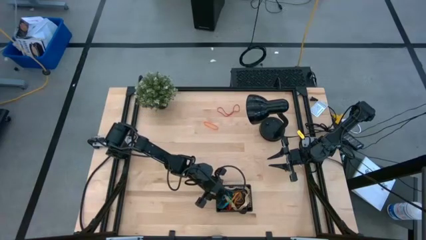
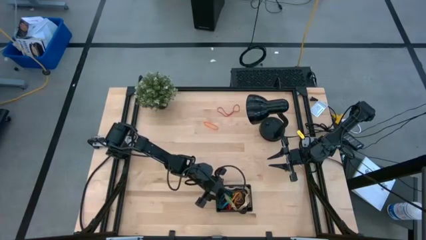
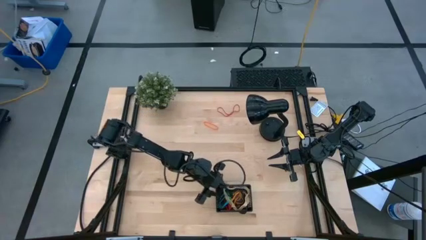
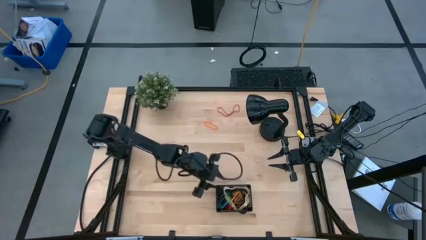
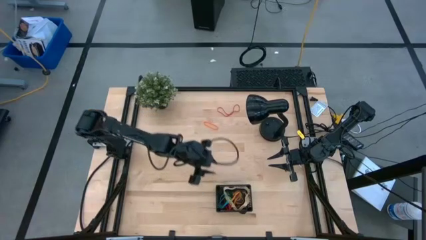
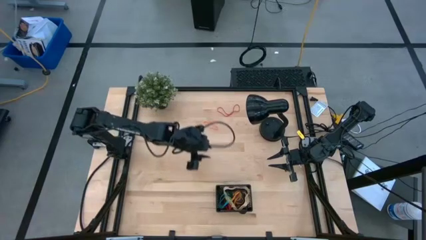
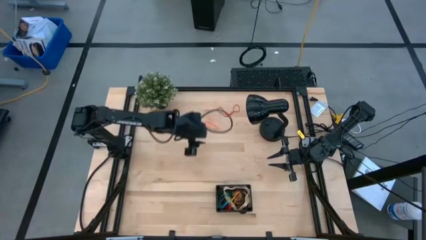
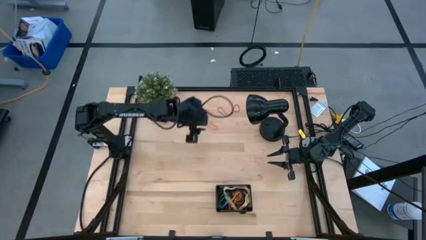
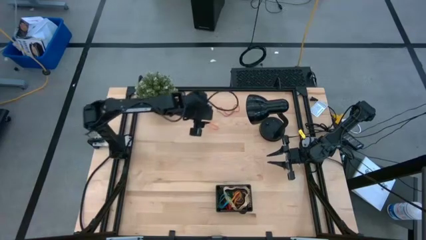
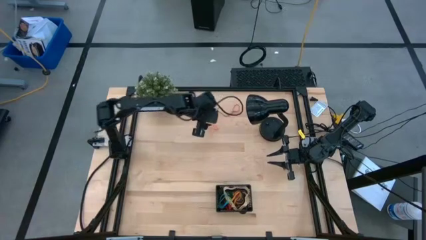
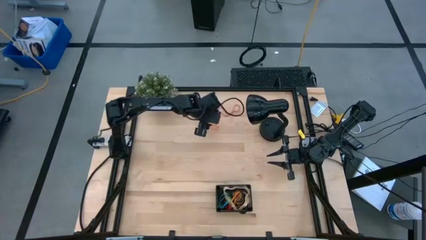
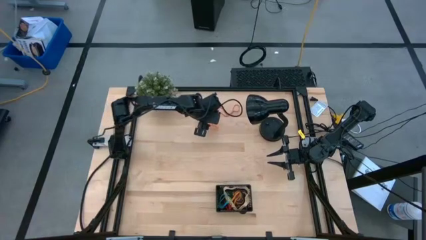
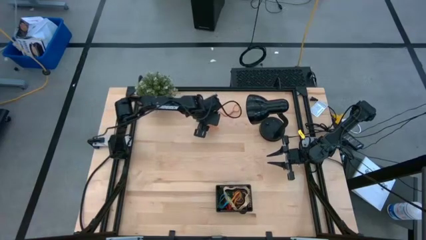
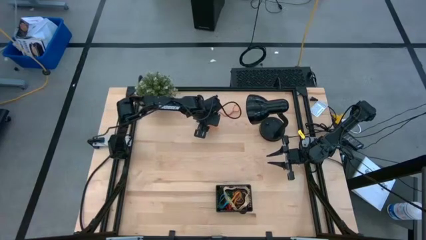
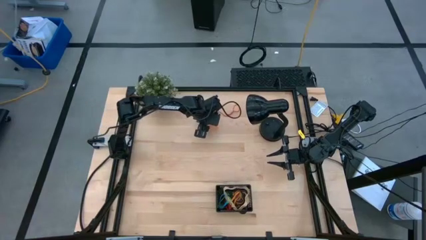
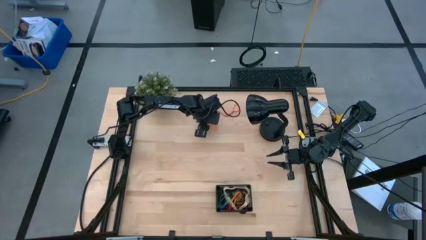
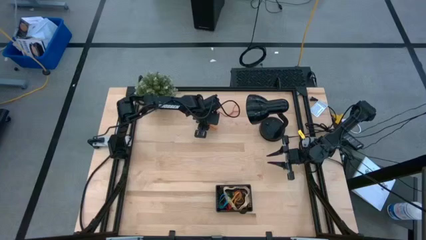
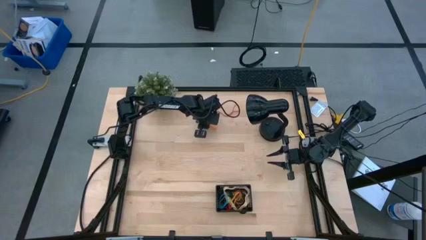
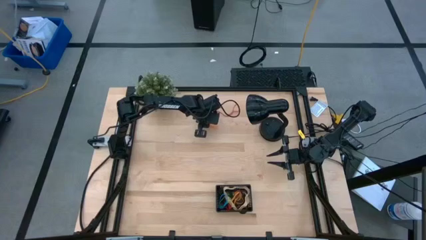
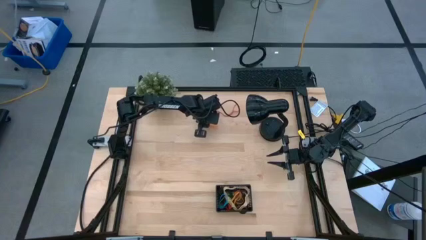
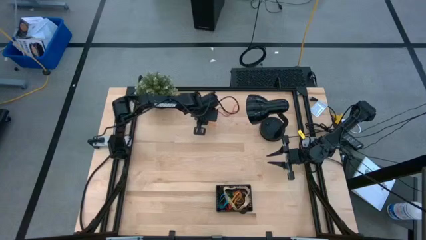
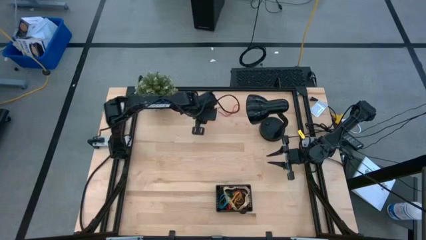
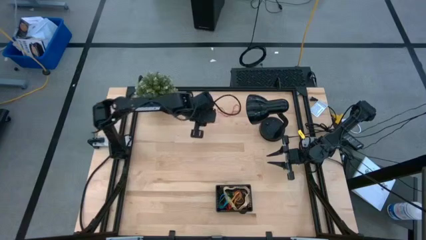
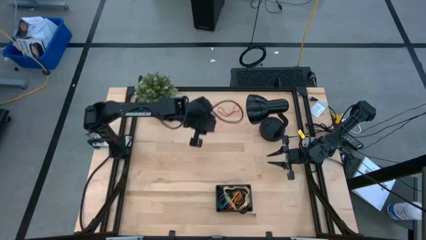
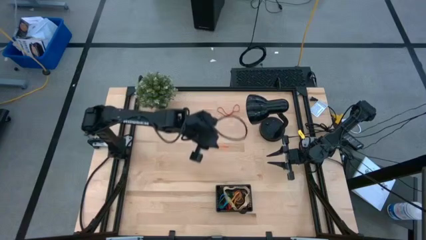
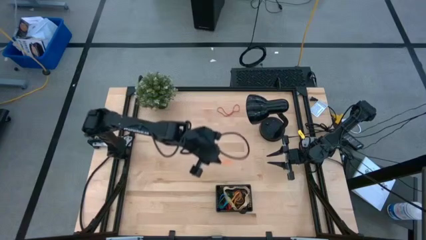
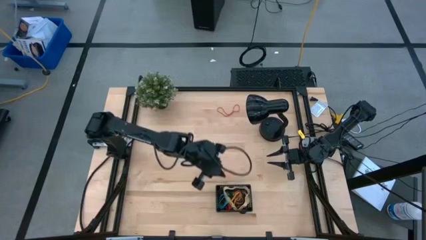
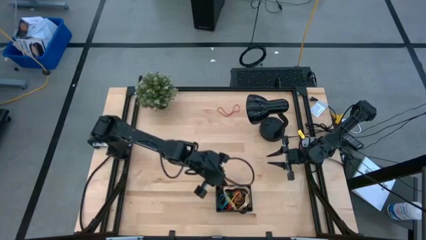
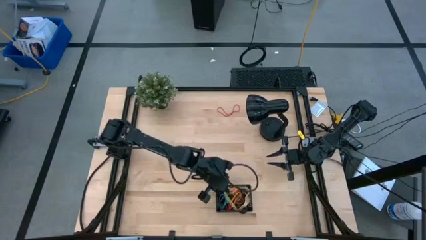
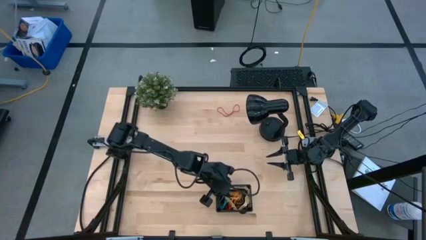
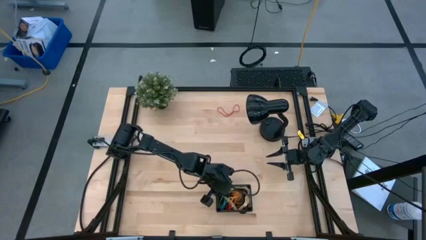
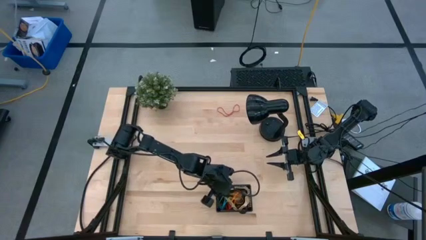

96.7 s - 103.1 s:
Task: Pick and place rubber bands into bin
Put the orange rubber band into the black bin

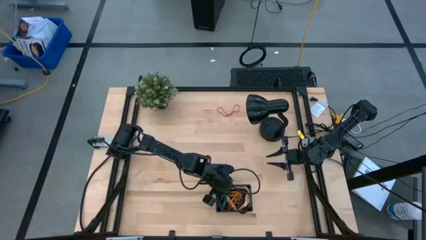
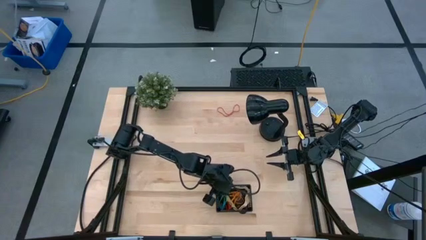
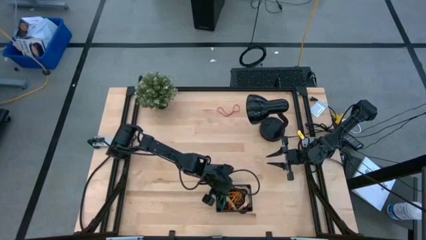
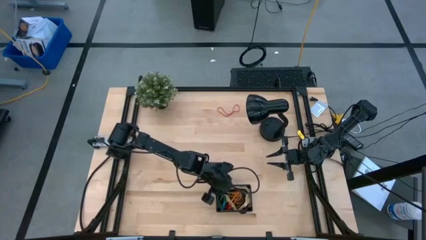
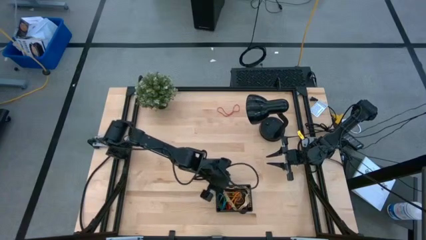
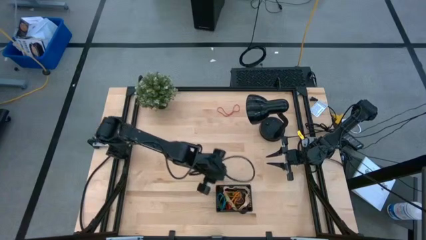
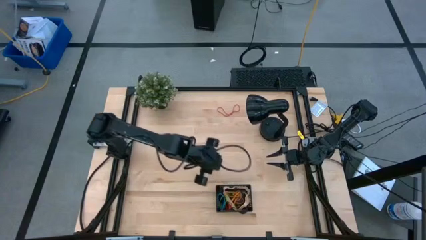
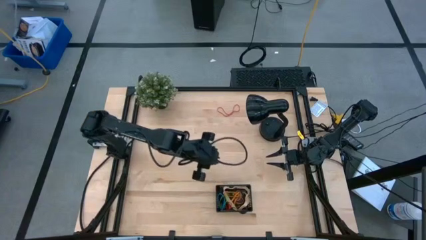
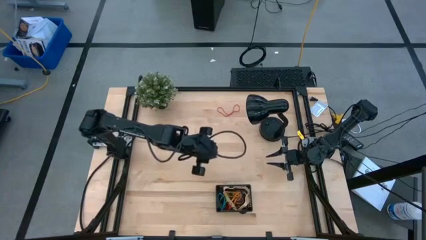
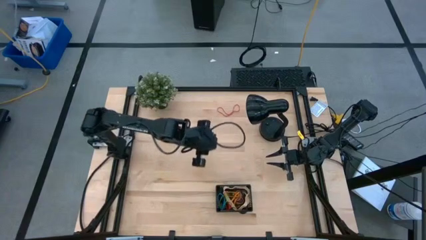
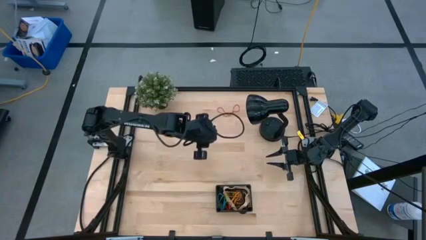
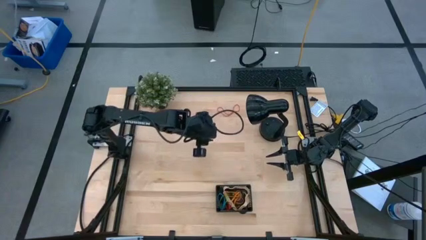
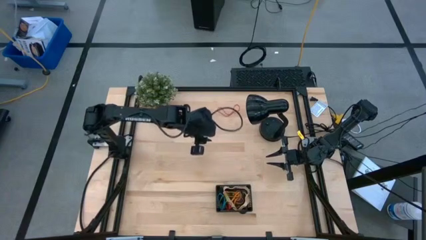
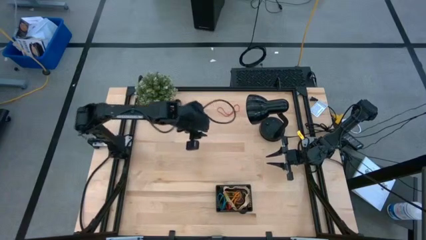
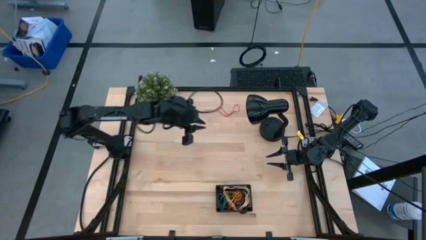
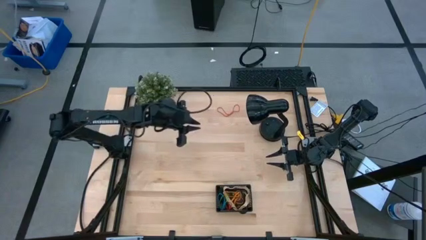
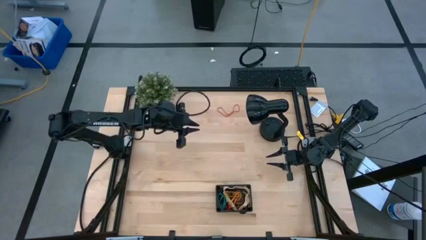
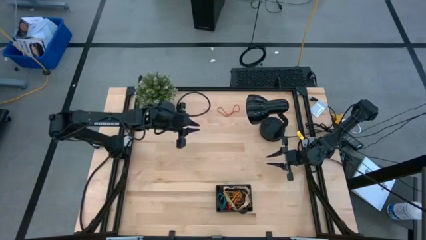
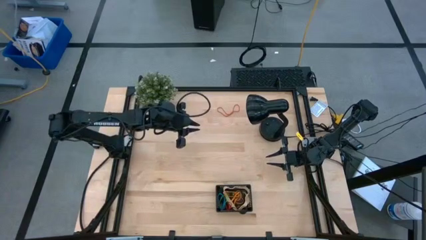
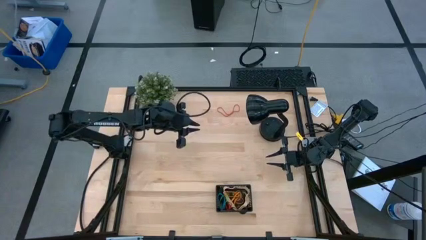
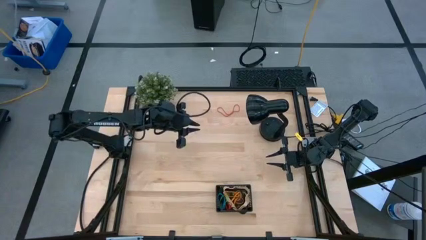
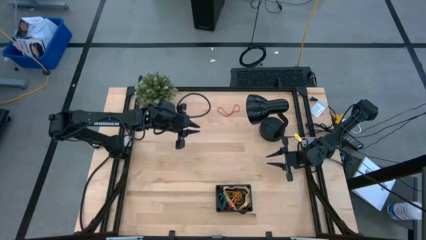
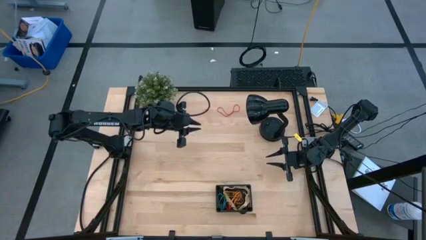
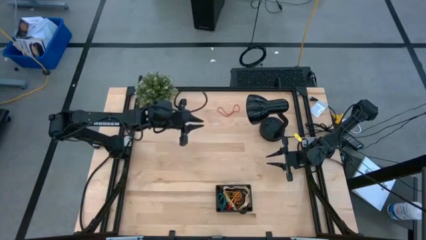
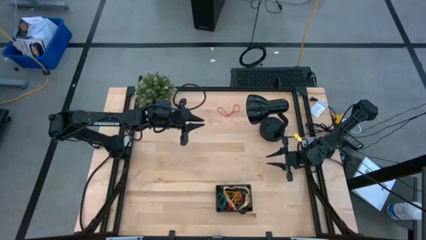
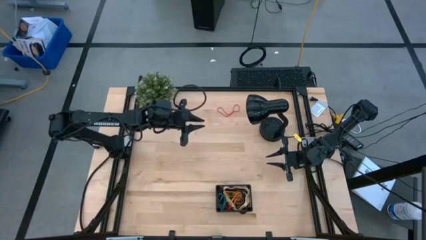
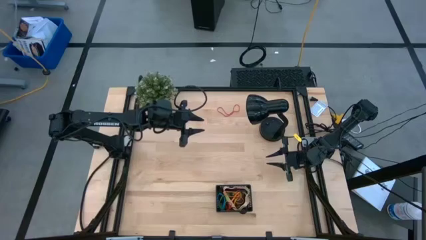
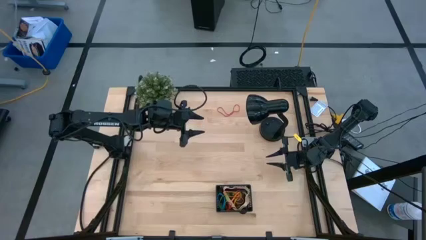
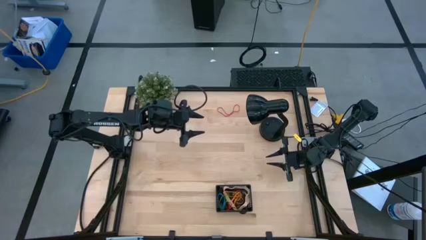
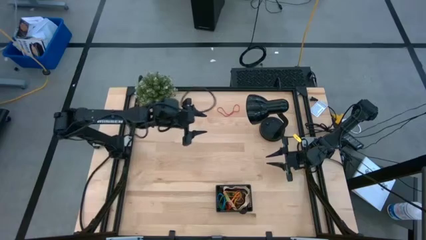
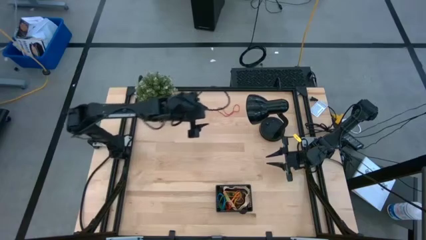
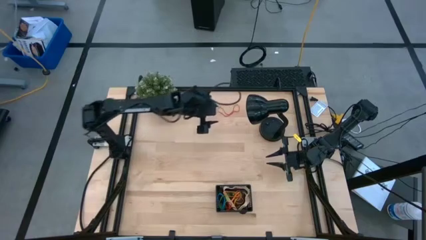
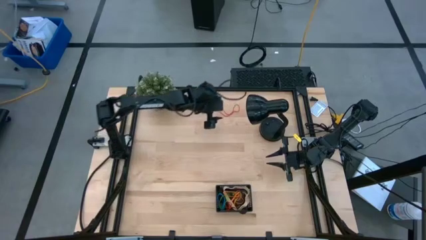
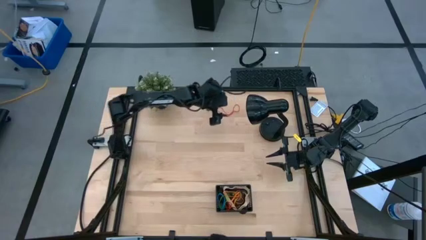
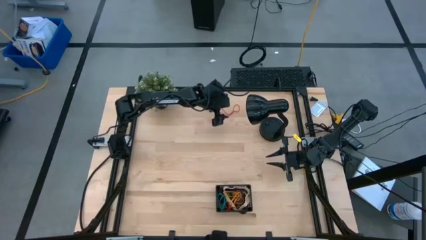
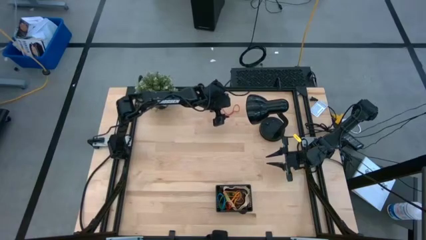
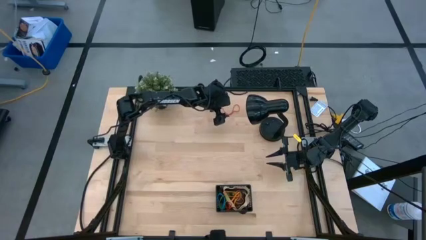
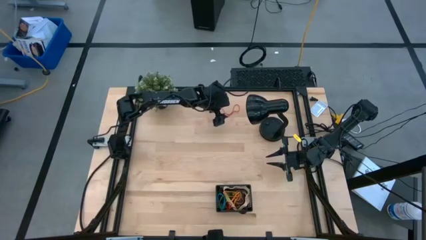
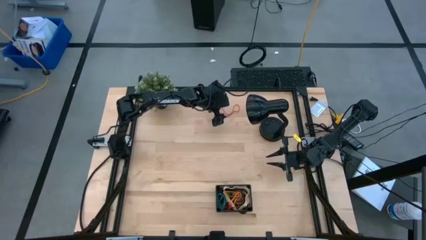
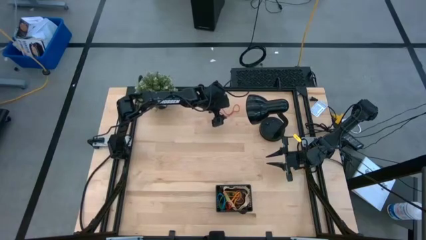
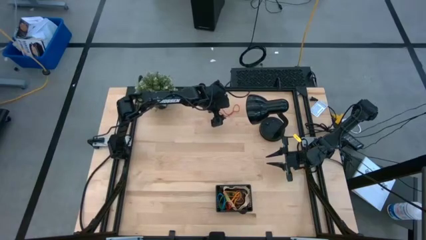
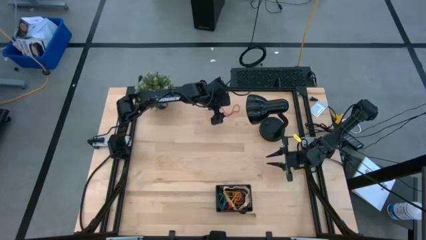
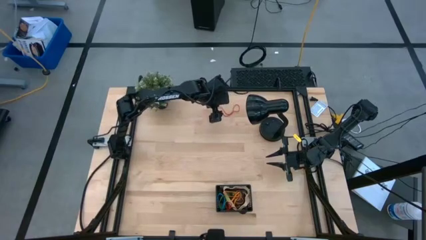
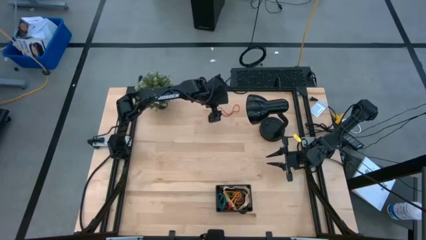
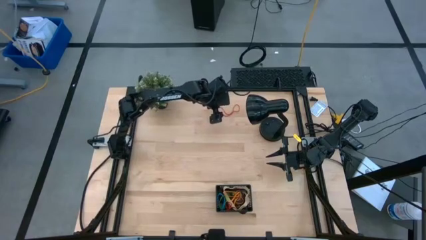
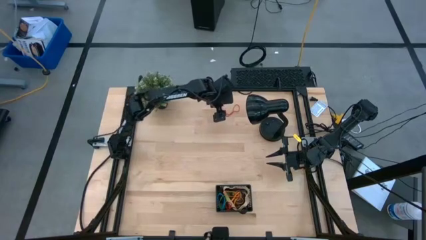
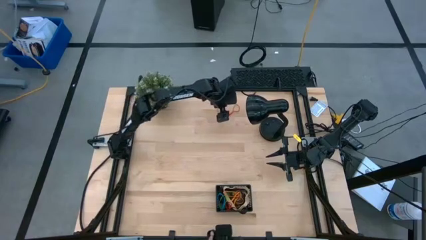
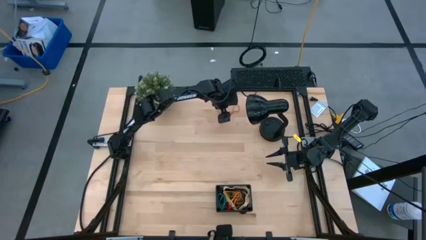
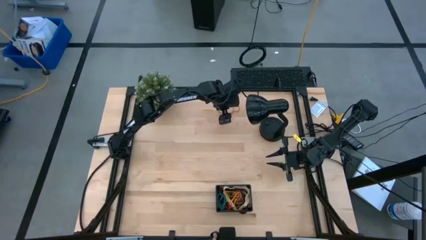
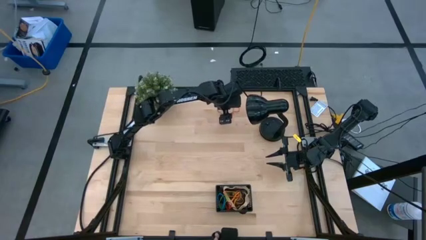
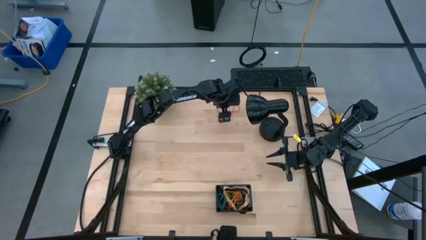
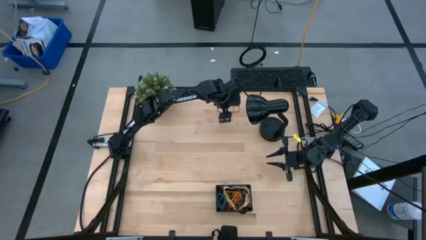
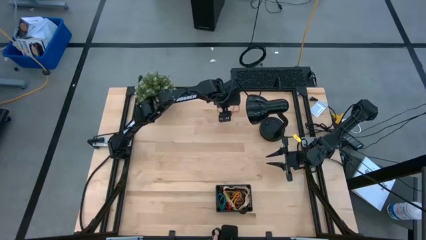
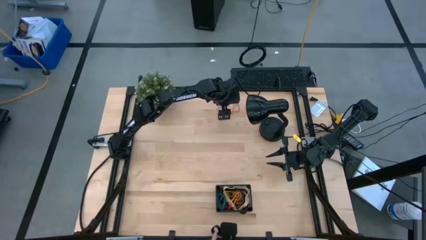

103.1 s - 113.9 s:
Put the red rubber band into the black bin
